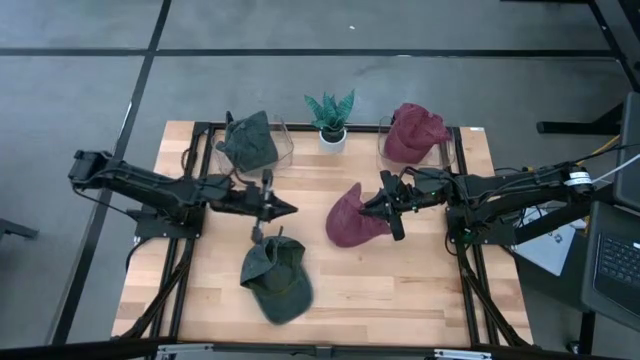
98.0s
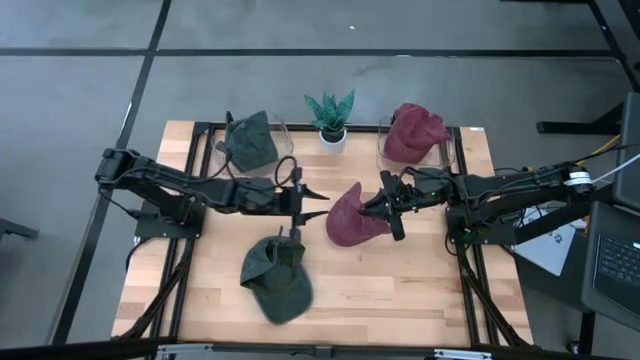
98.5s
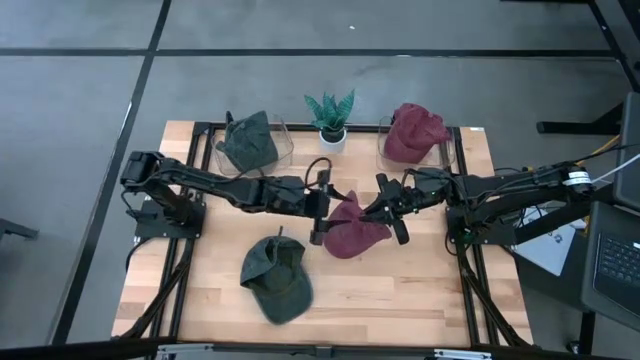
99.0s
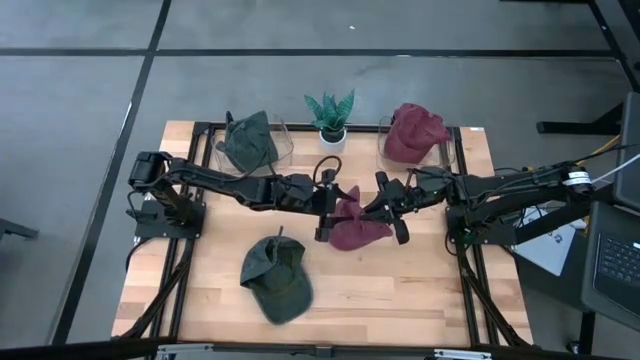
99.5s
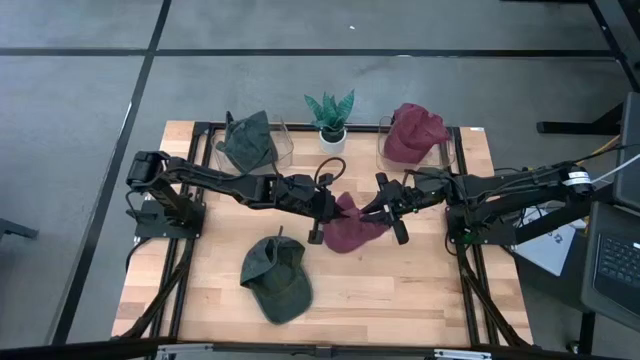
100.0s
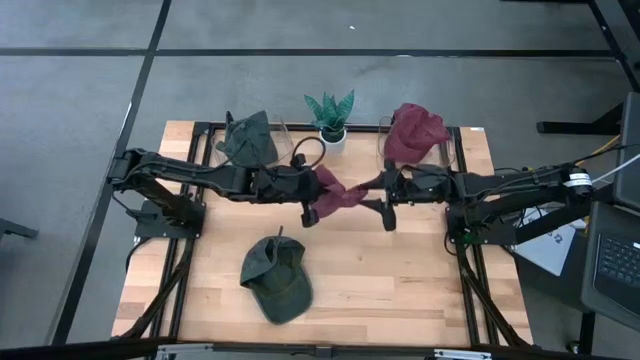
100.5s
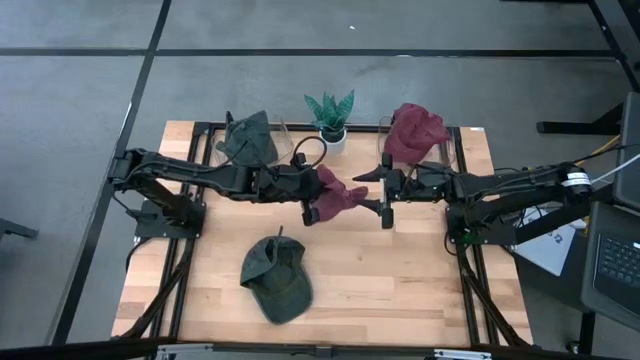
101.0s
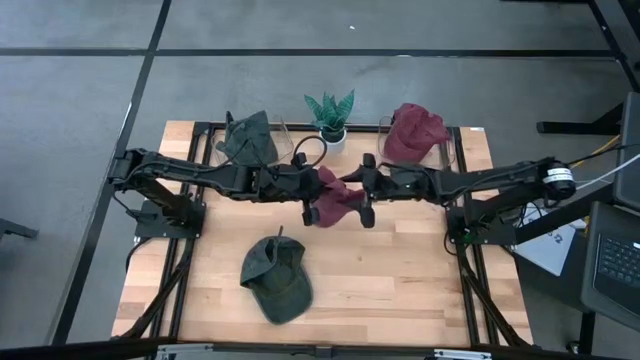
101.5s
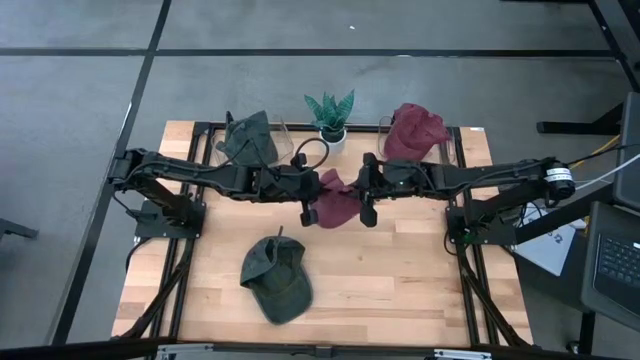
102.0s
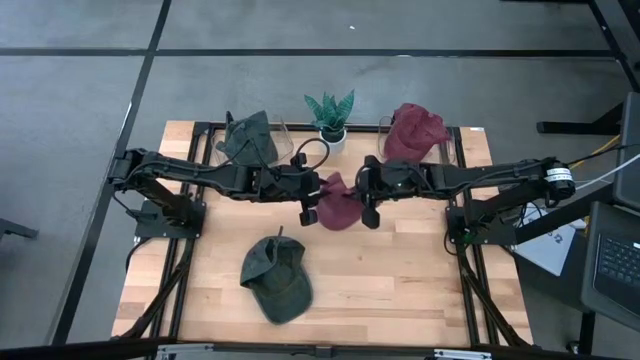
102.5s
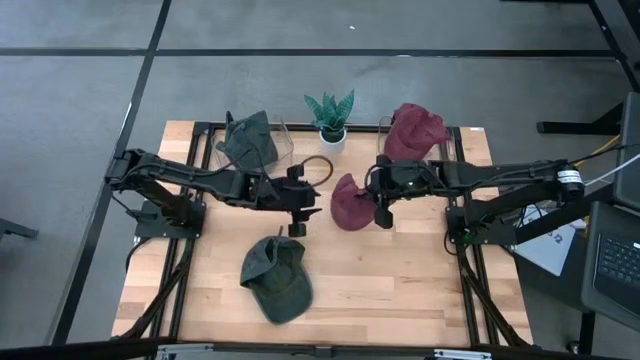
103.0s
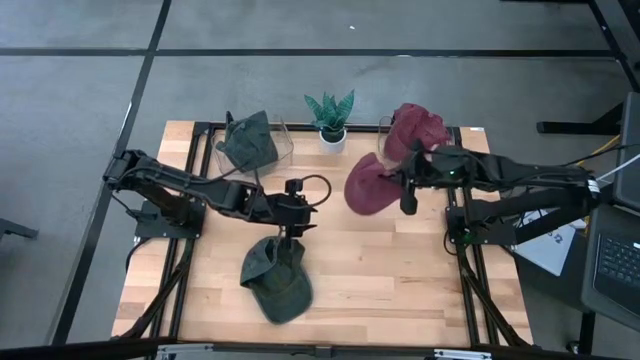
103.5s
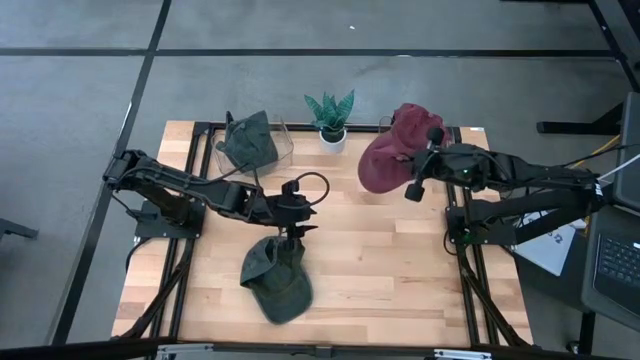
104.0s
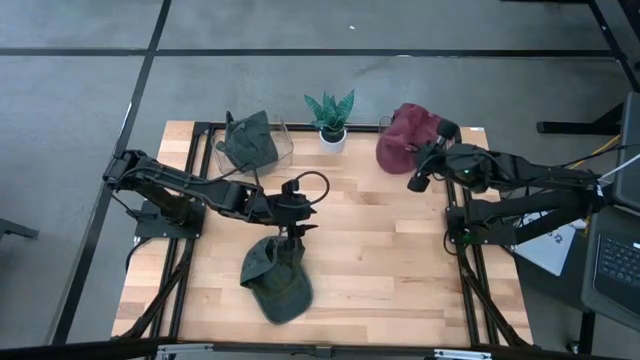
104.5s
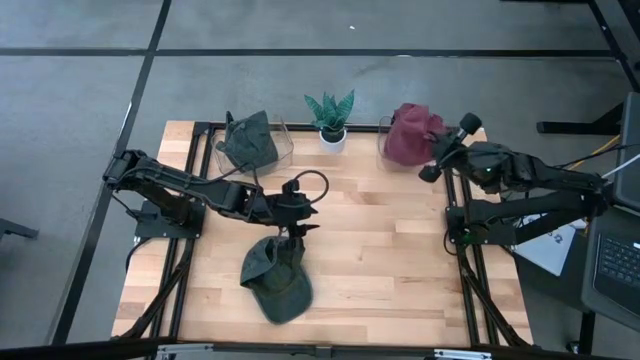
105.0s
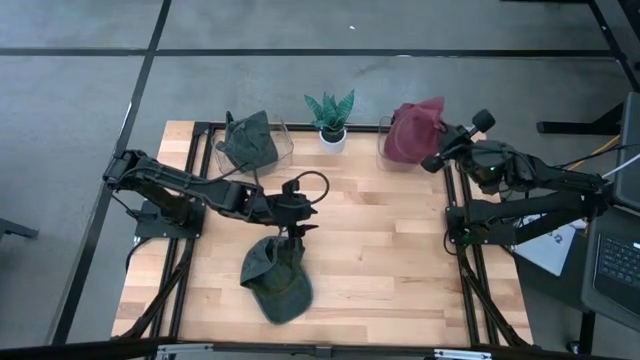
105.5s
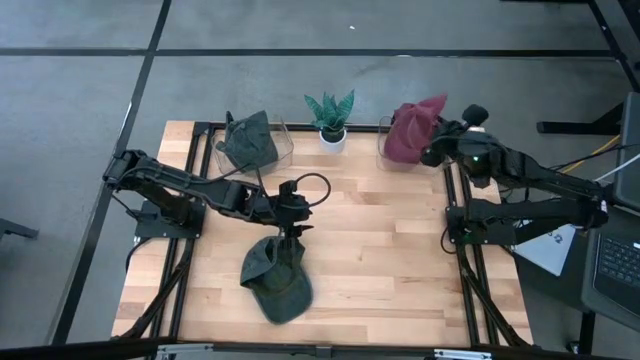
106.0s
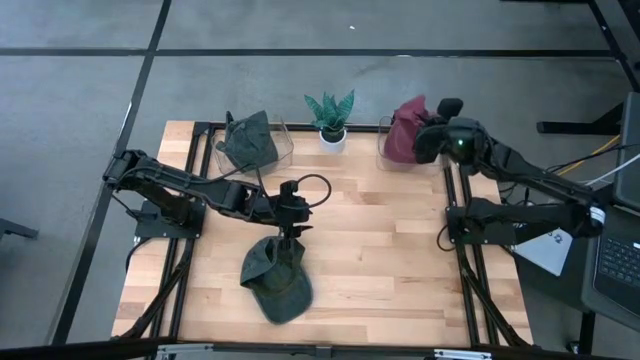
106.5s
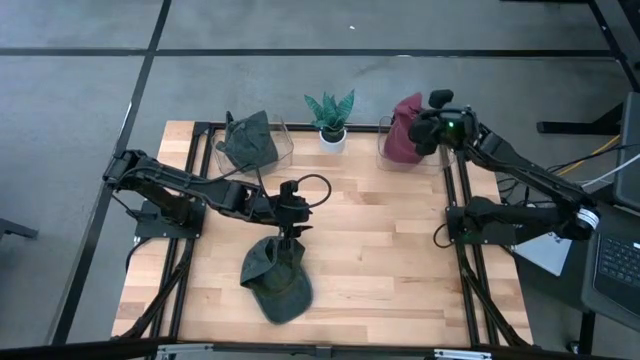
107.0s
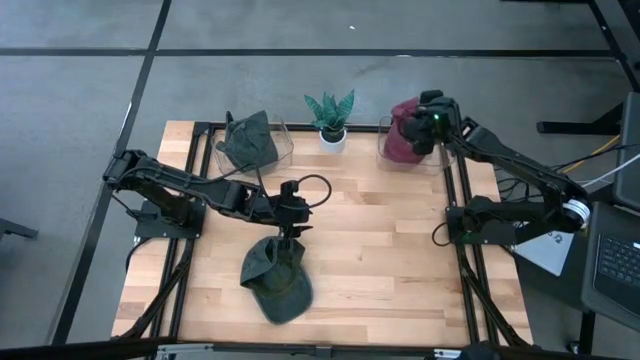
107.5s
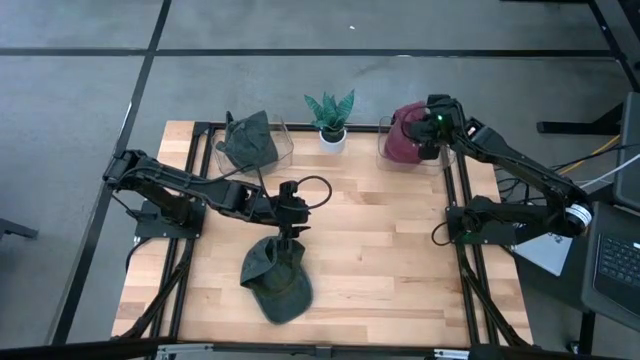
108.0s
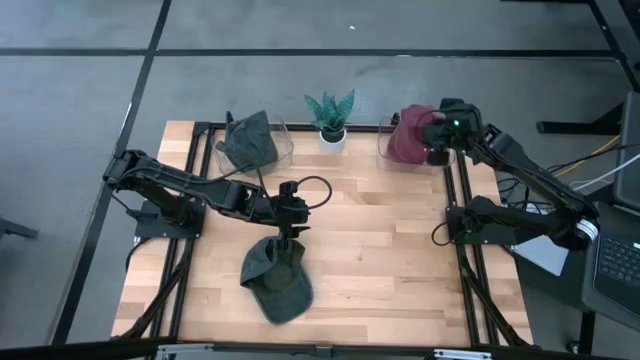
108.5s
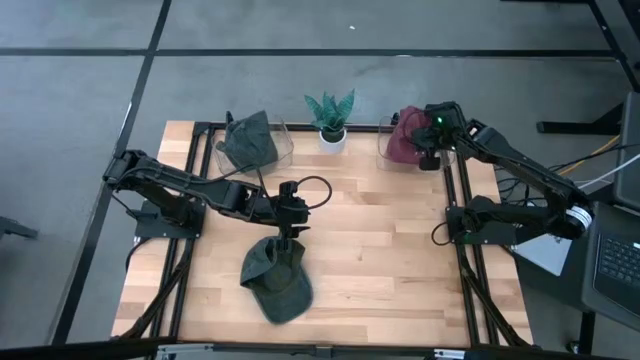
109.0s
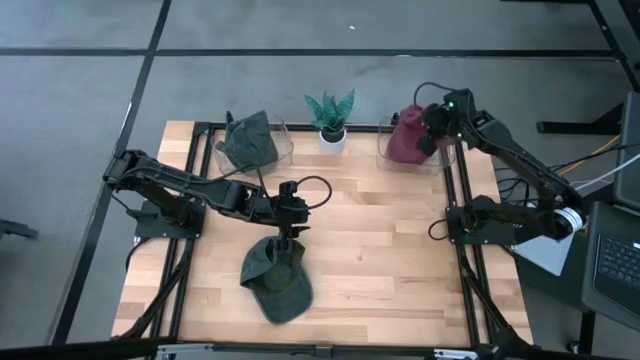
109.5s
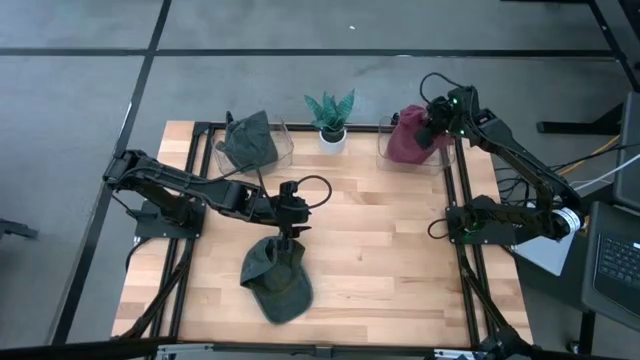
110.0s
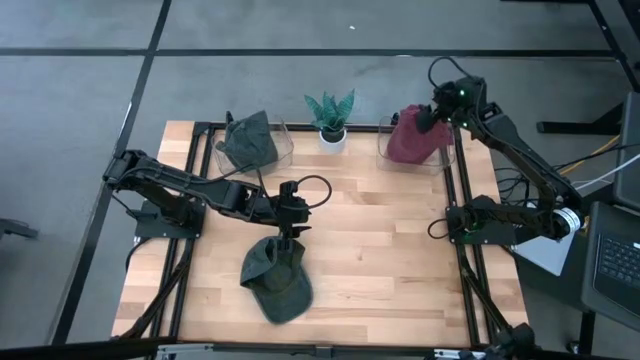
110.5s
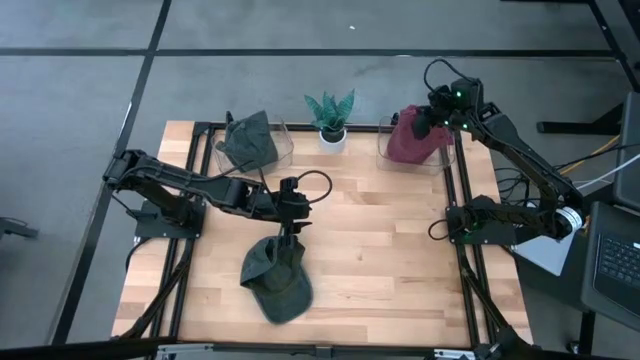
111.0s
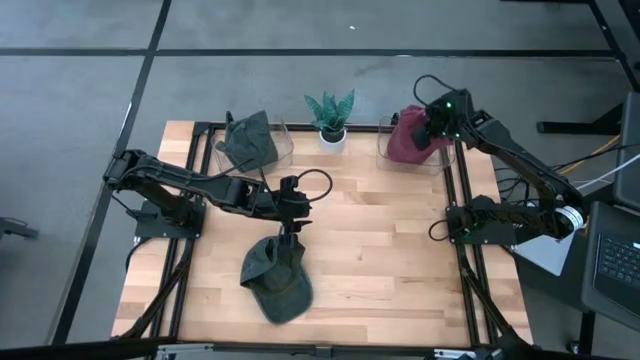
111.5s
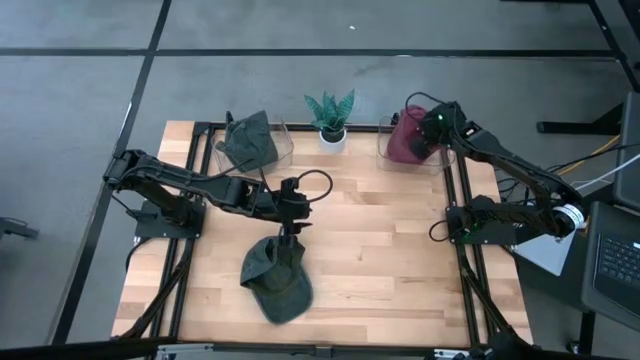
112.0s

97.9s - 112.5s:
Task: Pick & Place hat
Put the red cap into the right transparent bin

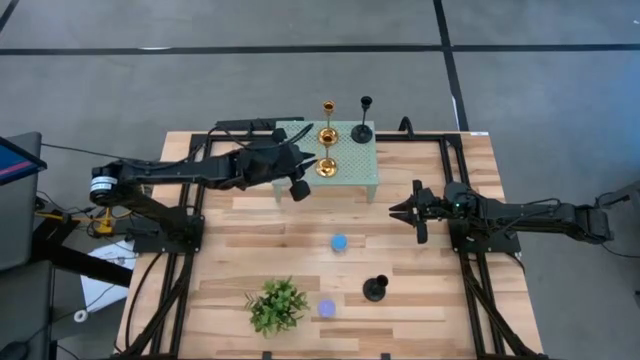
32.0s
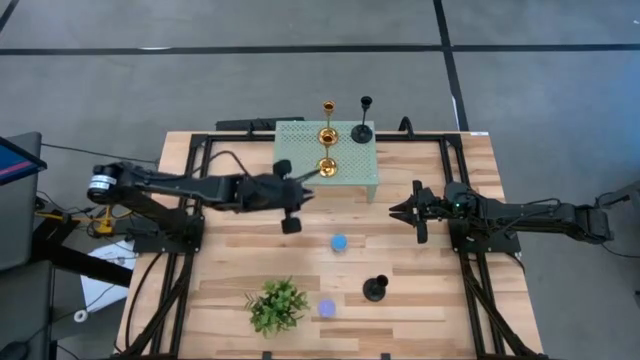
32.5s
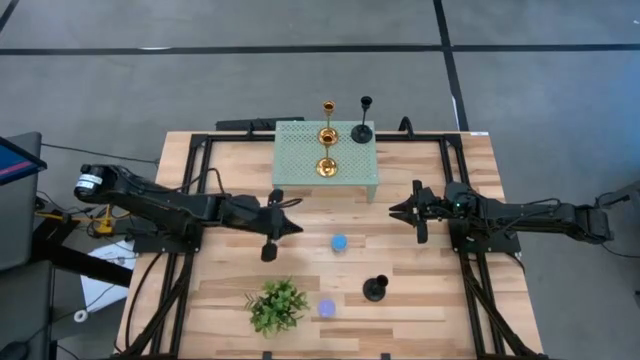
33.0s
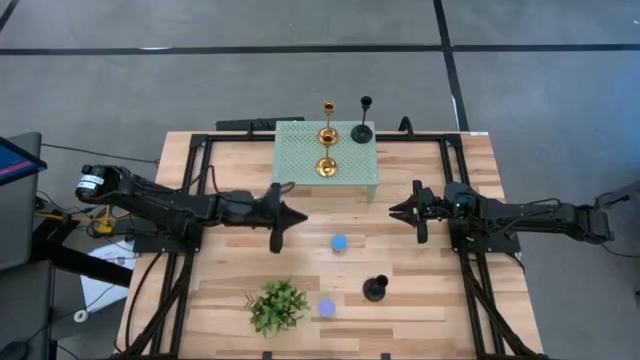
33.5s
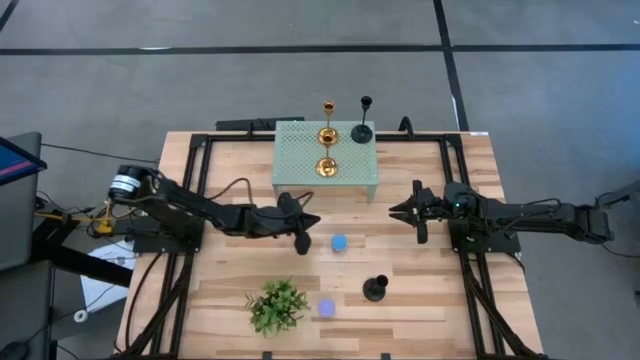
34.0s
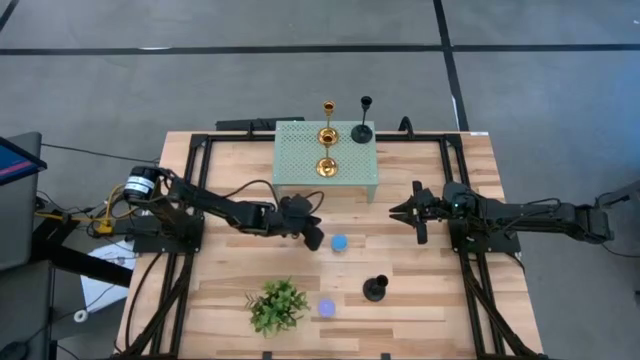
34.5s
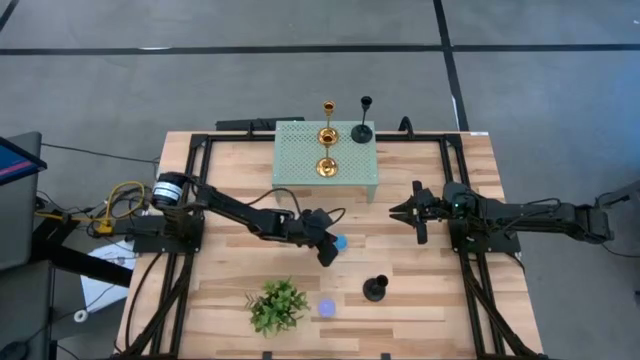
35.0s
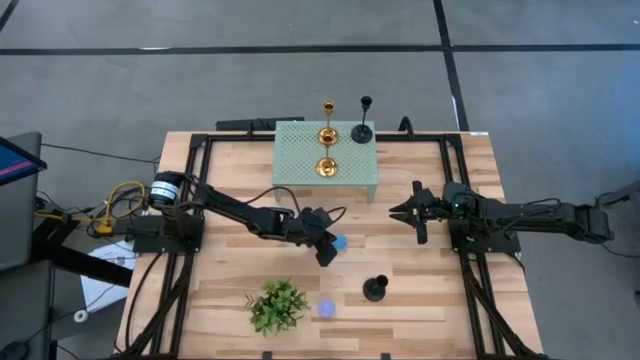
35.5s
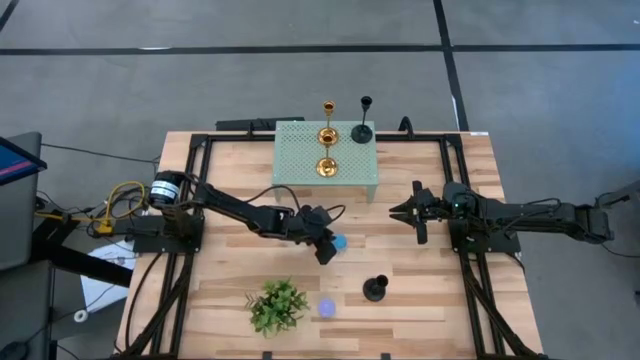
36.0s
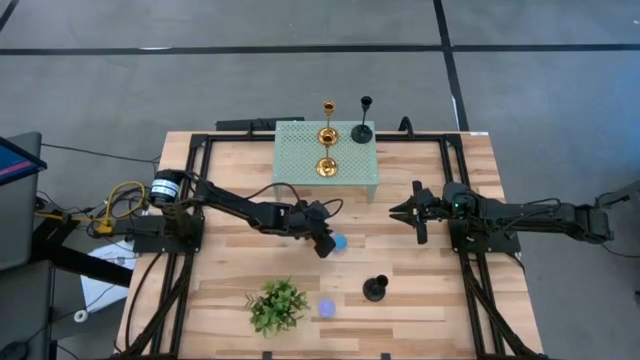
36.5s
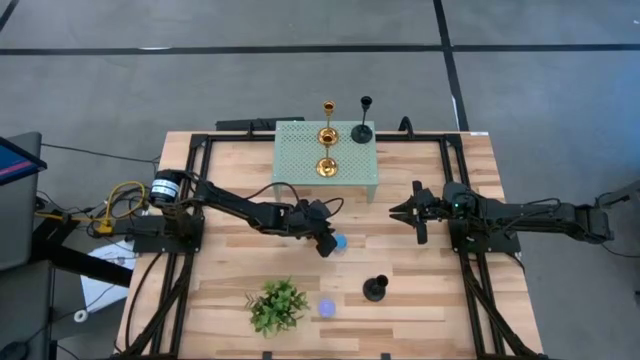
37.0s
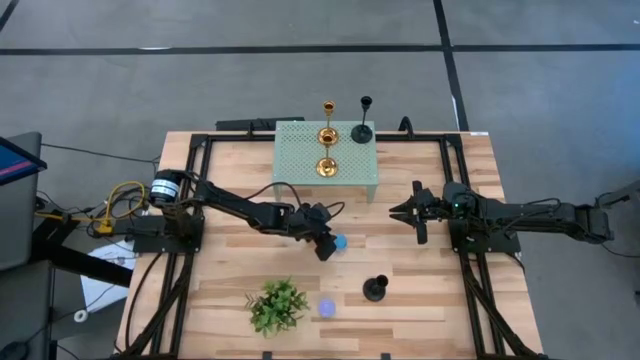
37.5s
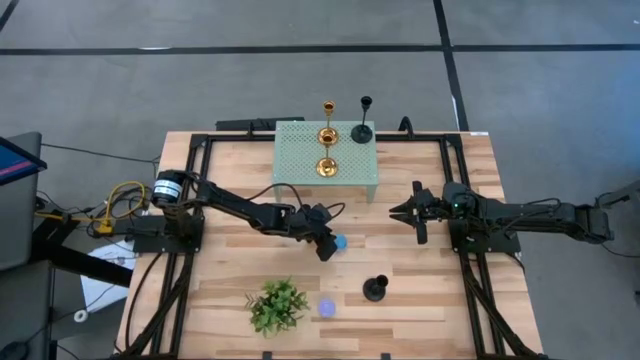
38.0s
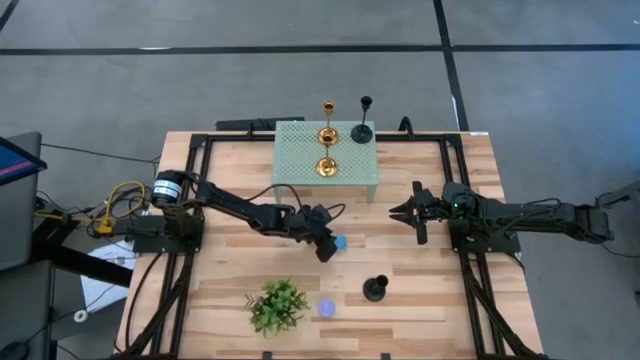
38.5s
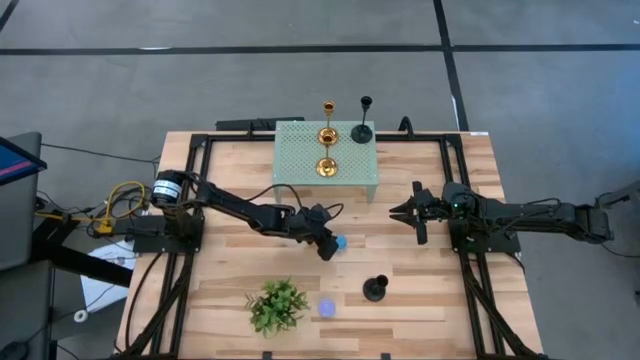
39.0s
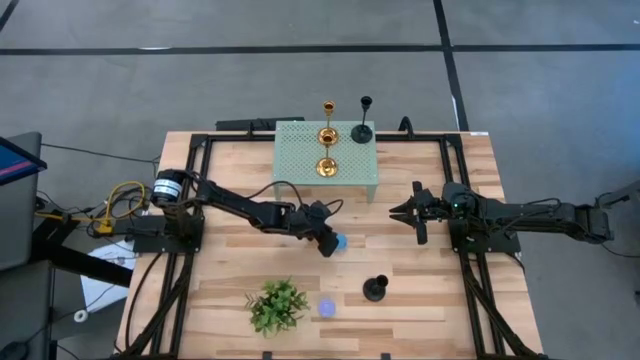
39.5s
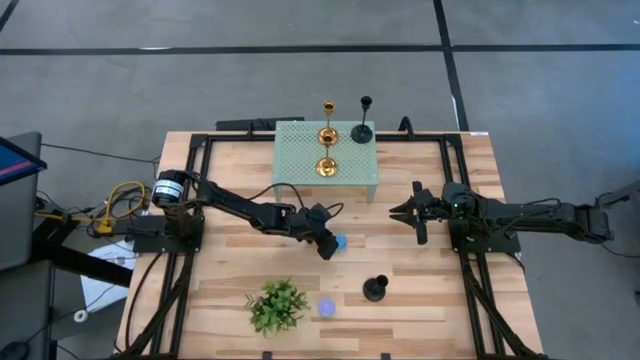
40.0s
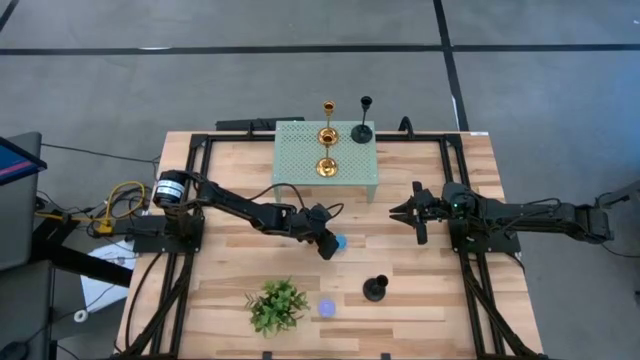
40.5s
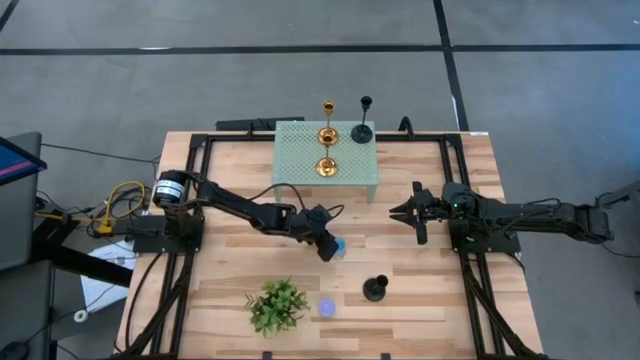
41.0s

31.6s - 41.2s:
Task: Pick & Place candle stick holders
Put the blue candle on the shelf
